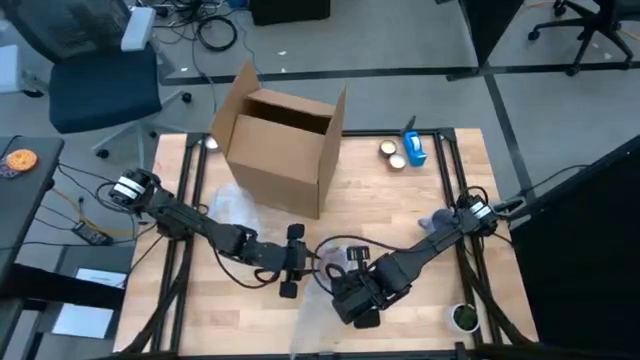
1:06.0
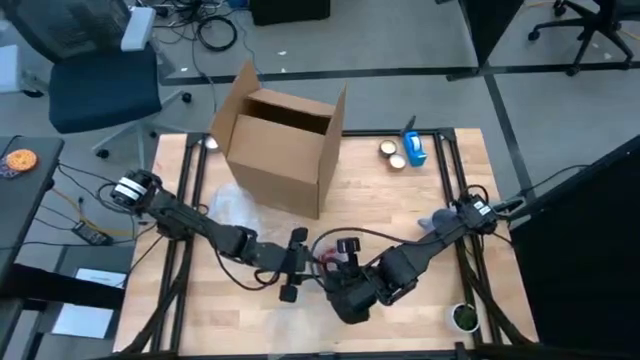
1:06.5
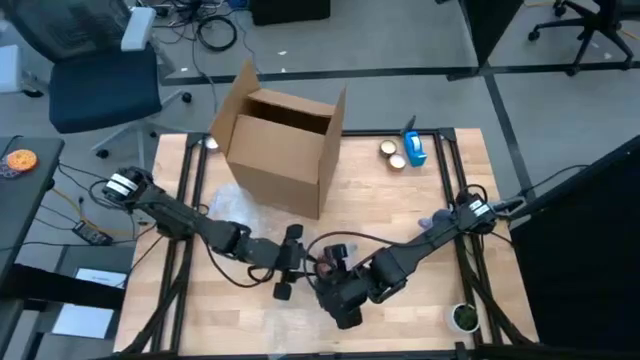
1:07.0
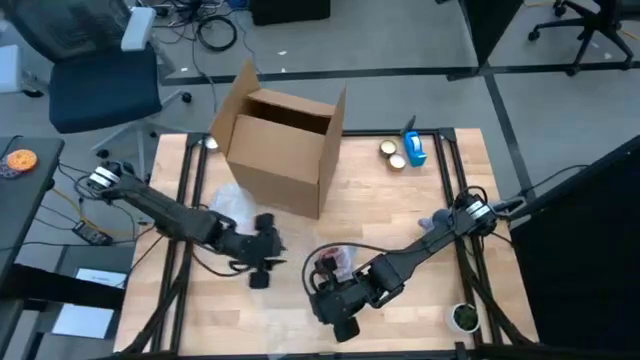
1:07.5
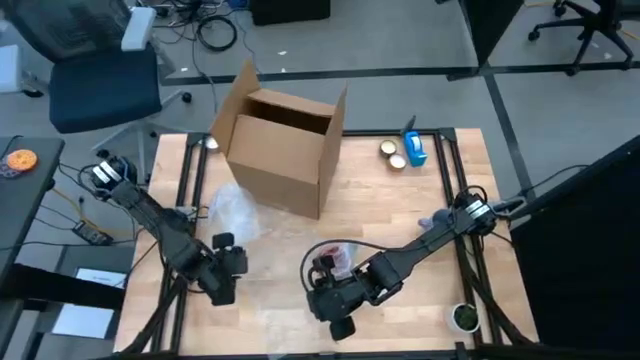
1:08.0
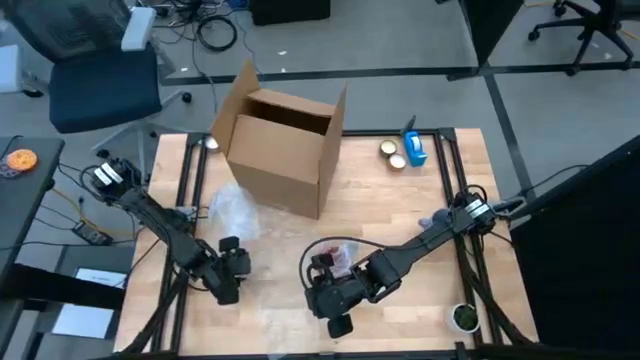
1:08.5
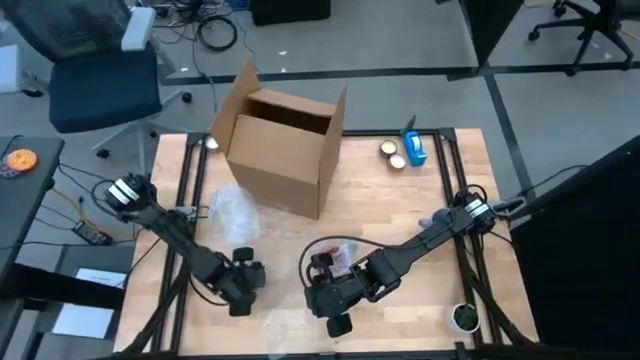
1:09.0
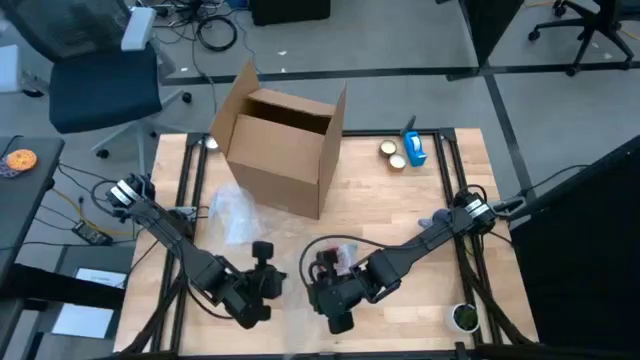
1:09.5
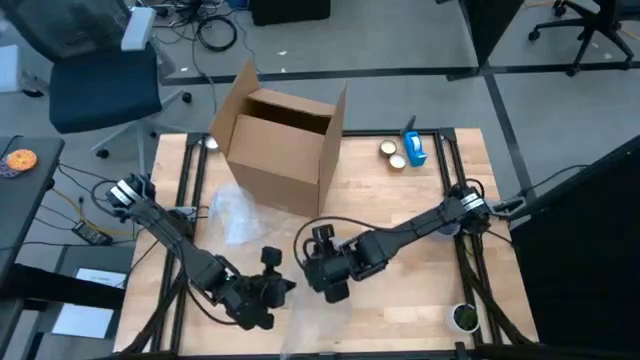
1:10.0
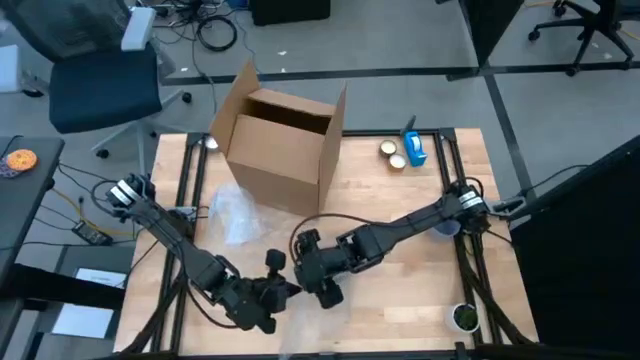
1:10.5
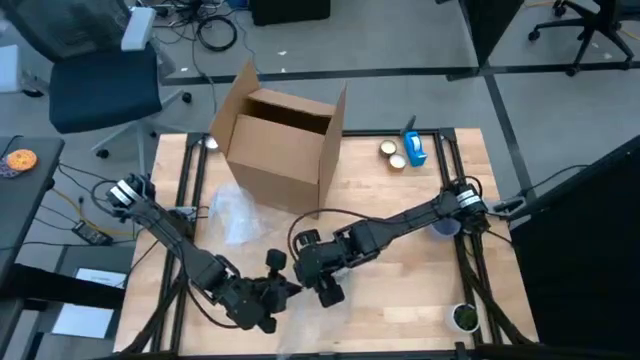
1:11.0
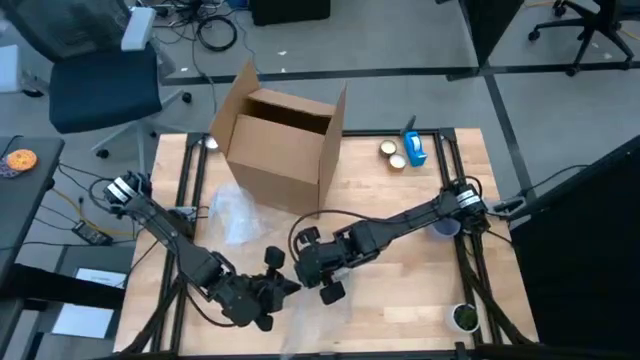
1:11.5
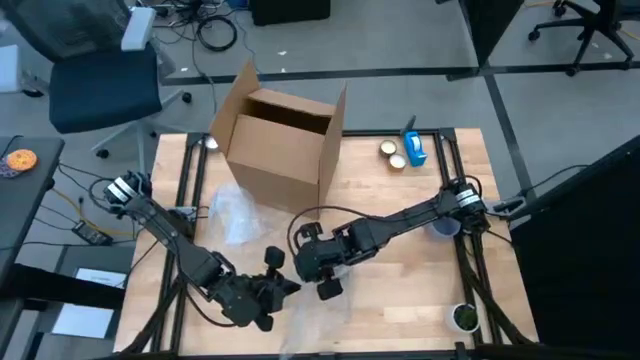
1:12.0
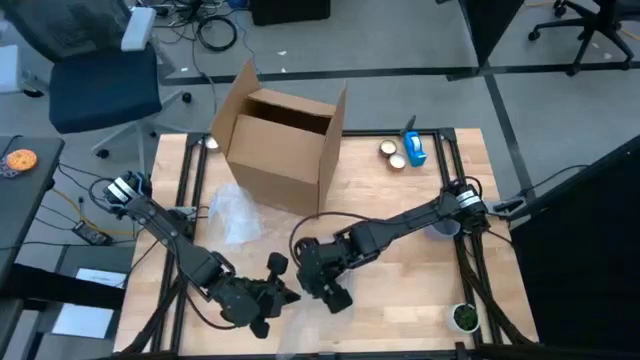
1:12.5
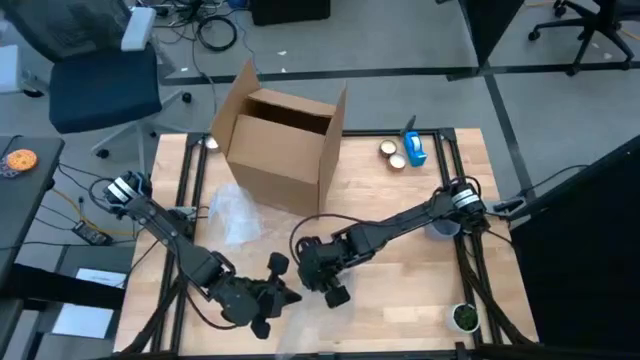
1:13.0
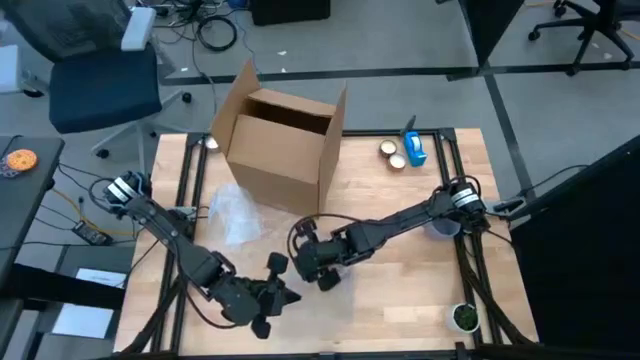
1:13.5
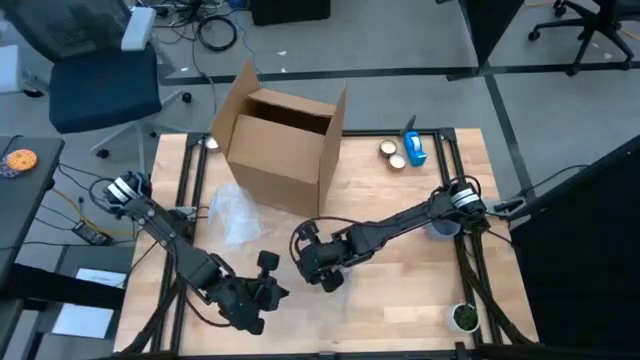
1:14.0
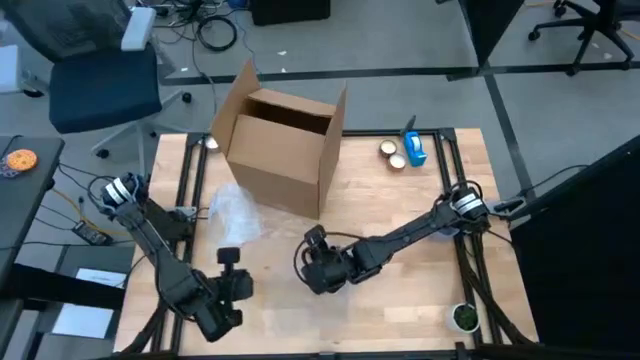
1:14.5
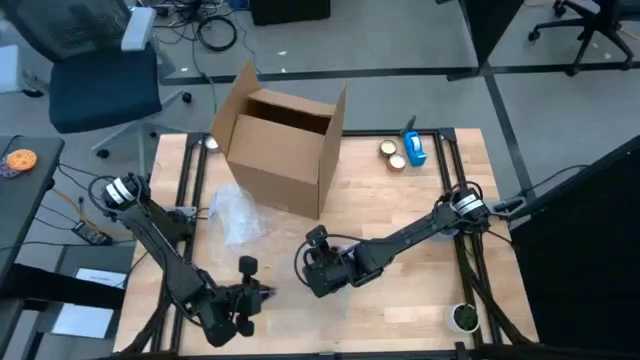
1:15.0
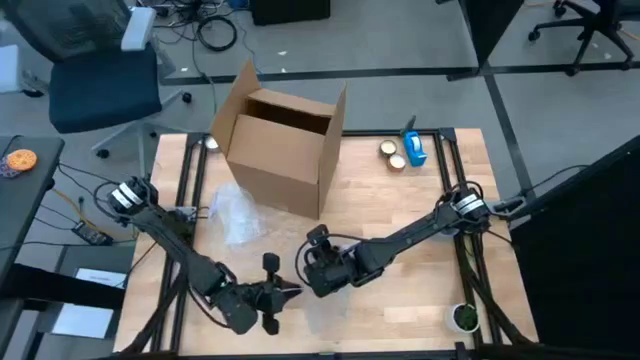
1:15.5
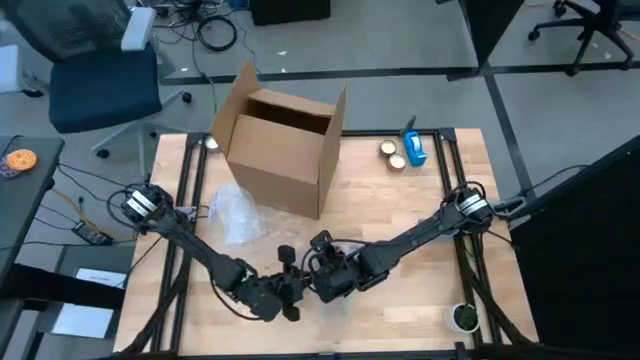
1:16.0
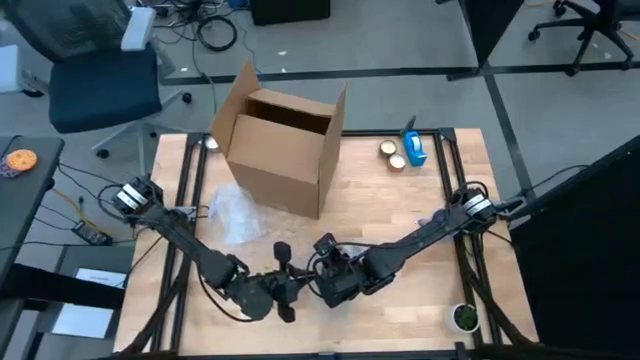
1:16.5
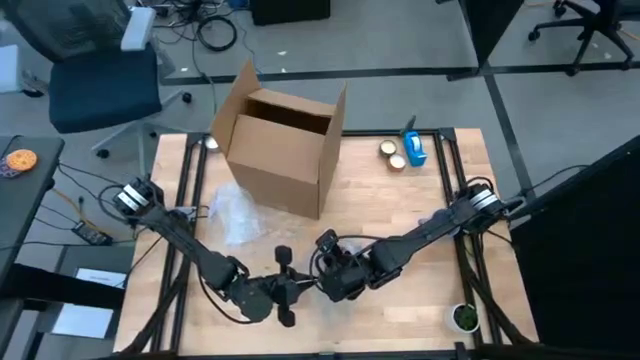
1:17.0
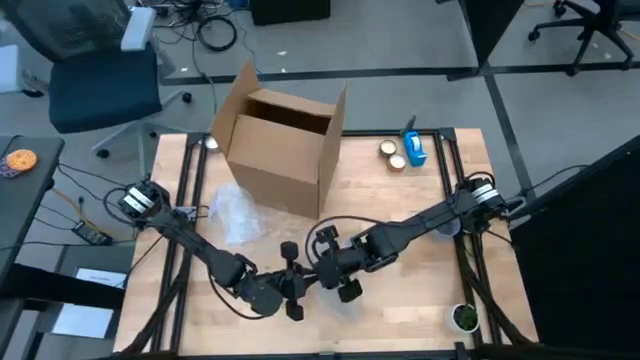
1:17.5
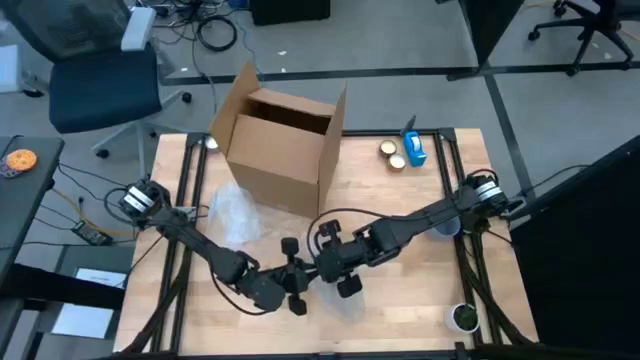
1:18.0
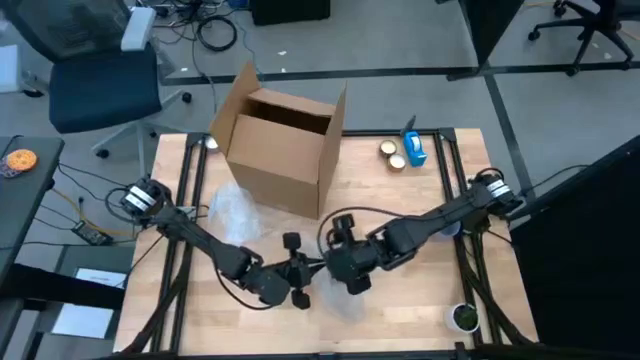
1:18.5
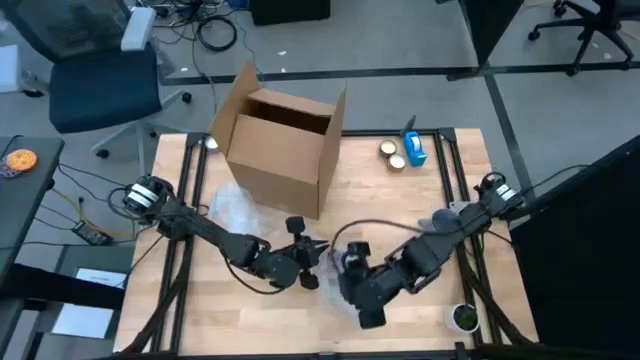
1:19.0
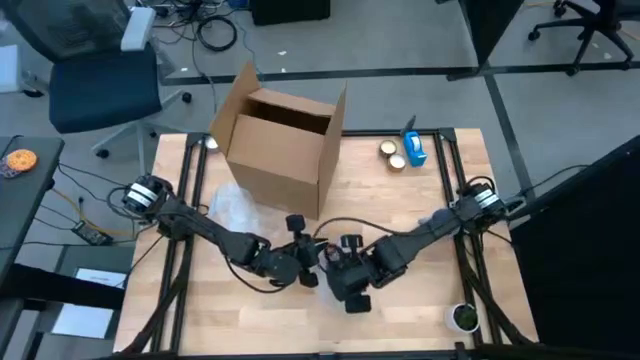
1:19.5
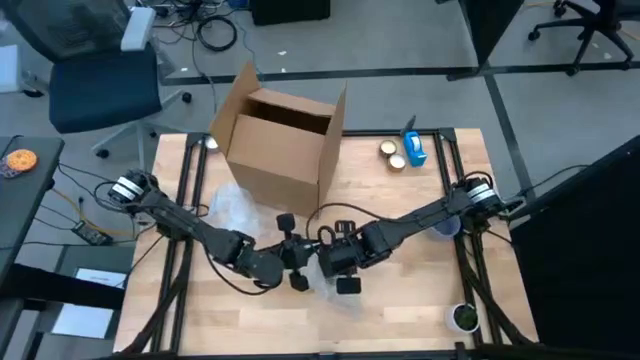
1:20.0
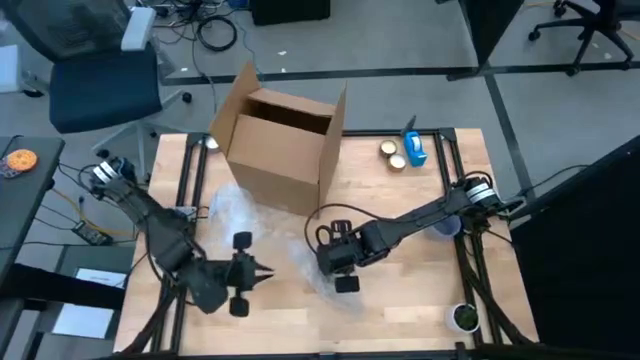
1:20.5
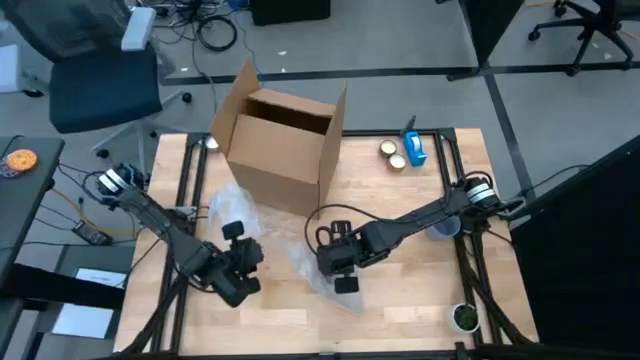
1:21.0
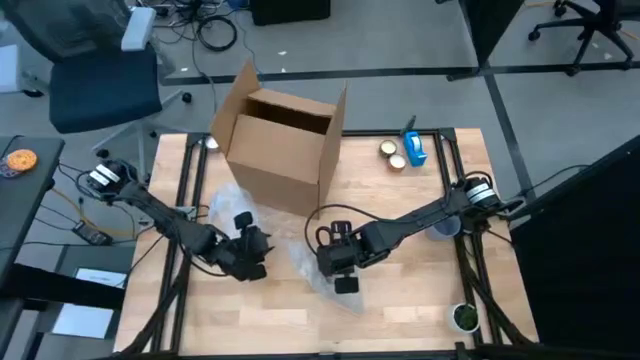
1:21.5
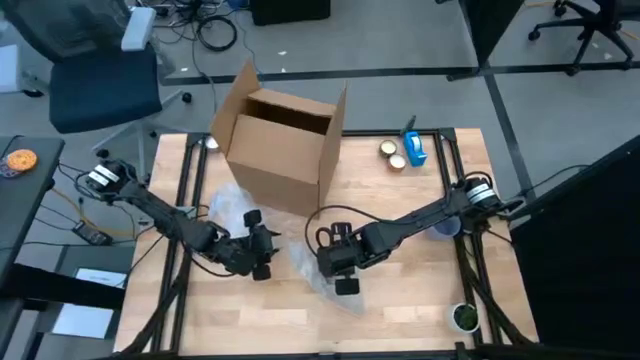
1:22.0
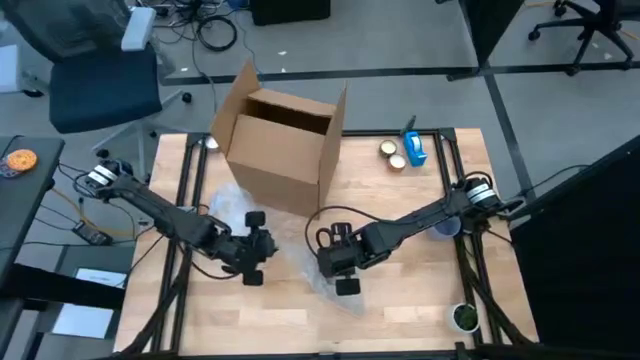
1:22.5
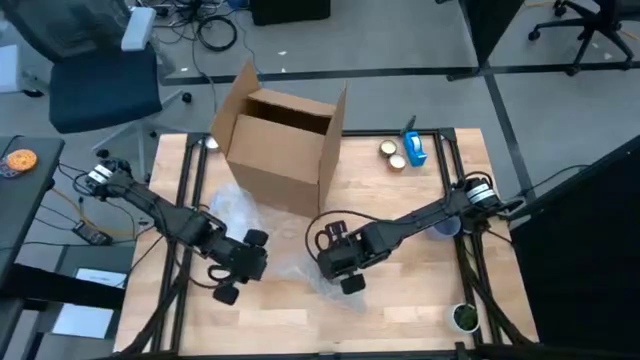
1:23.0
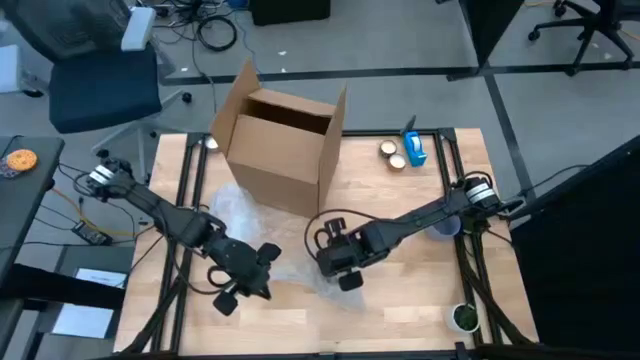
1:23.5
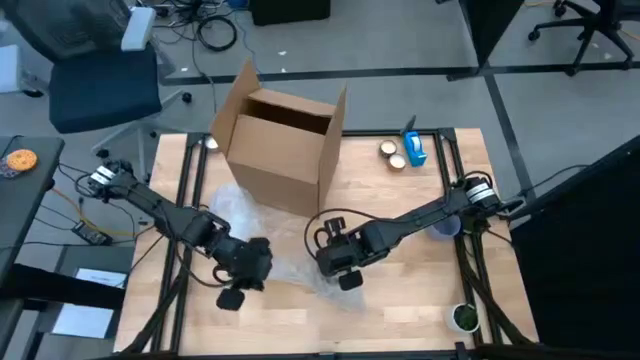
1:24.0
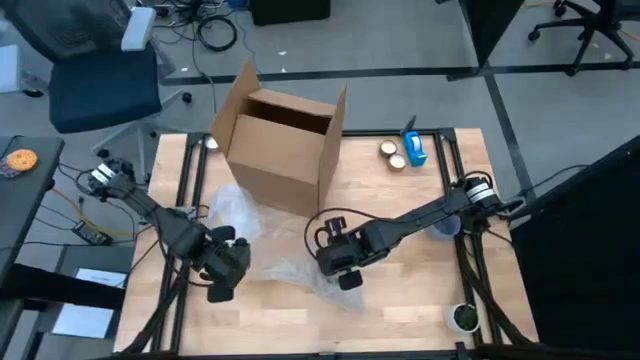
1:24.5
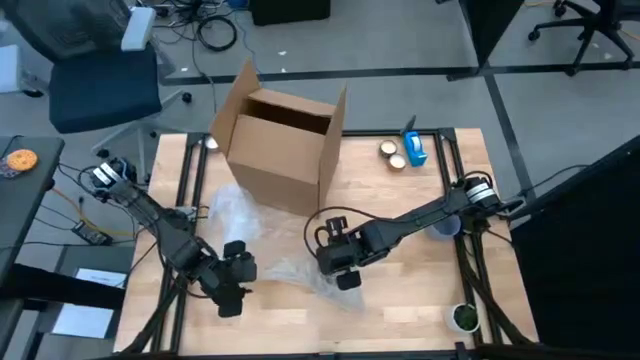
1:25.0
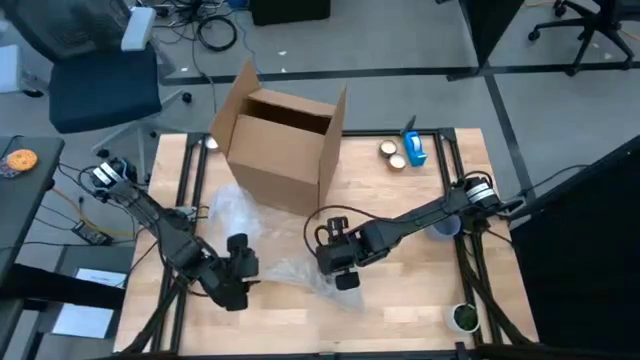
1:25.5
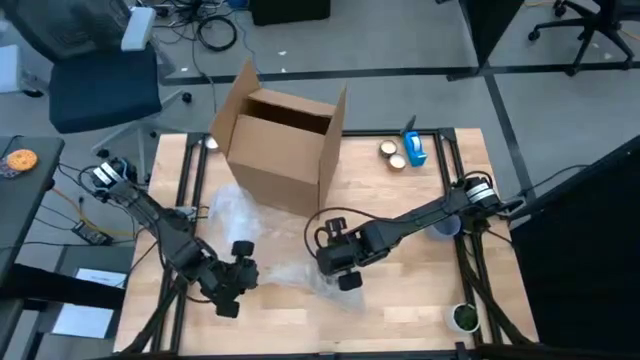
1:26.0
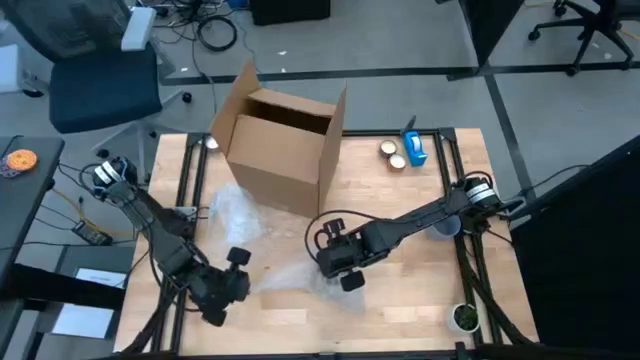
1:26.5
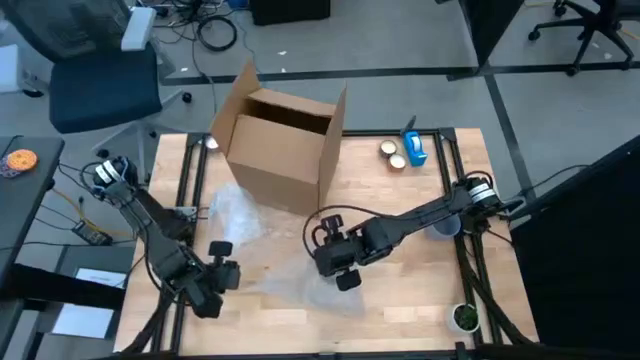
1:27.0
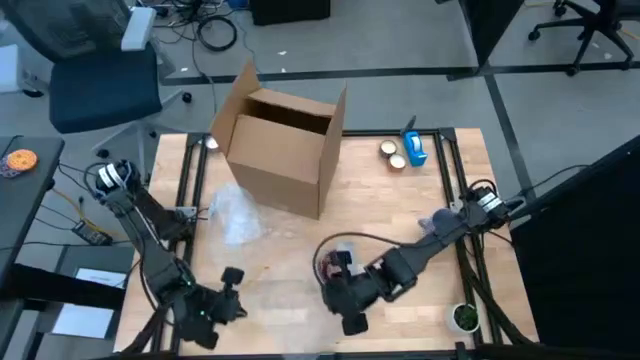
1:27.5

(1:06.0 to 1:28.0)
Task: wrap mug
Wrap the orange mug with bubble wrap
